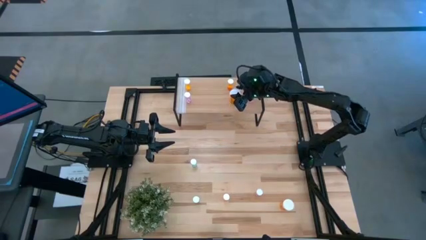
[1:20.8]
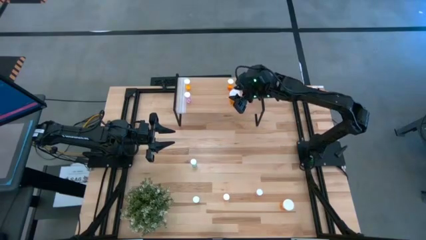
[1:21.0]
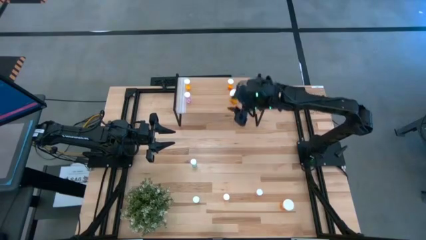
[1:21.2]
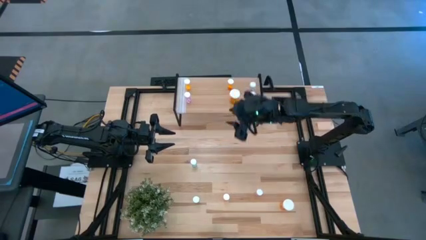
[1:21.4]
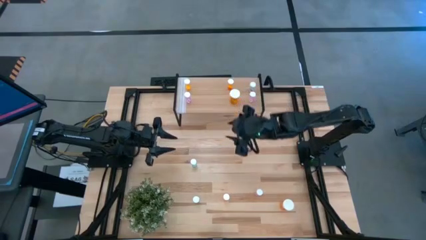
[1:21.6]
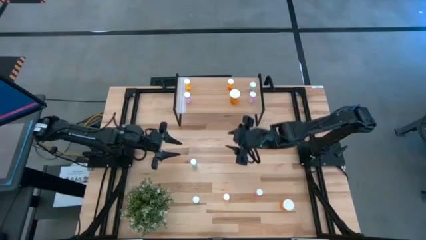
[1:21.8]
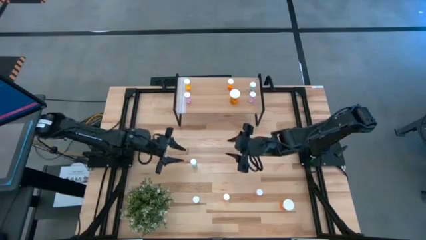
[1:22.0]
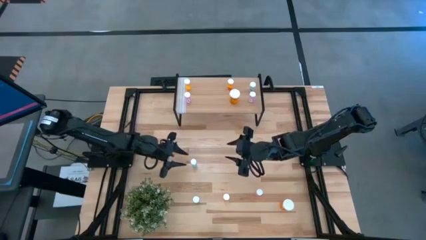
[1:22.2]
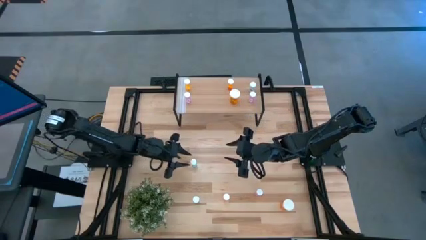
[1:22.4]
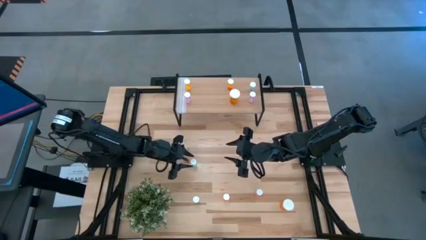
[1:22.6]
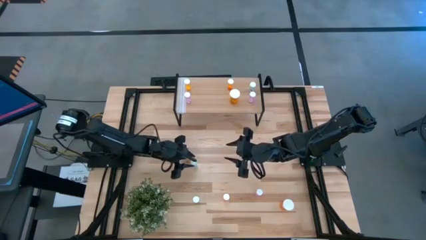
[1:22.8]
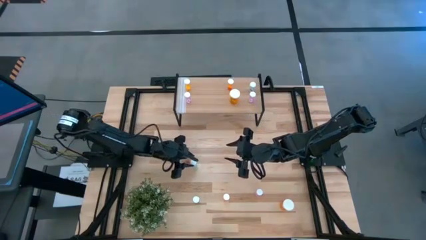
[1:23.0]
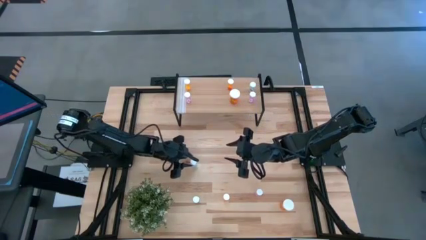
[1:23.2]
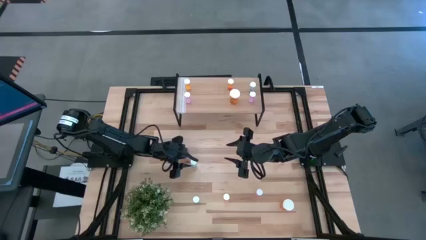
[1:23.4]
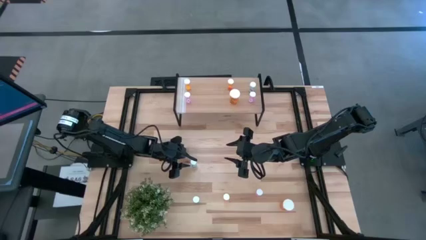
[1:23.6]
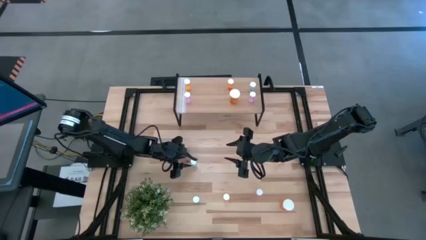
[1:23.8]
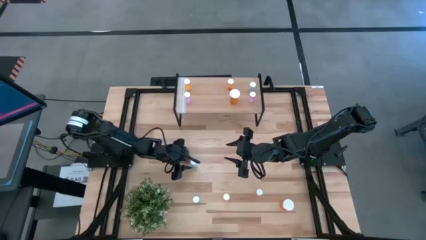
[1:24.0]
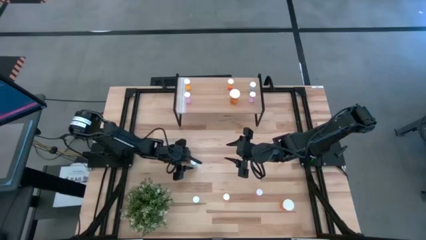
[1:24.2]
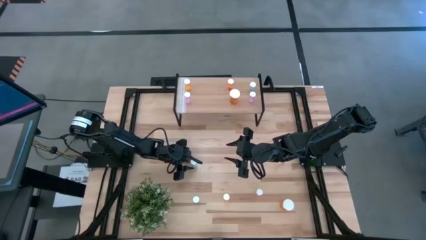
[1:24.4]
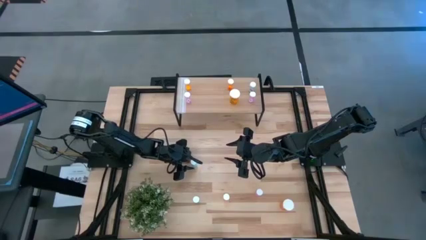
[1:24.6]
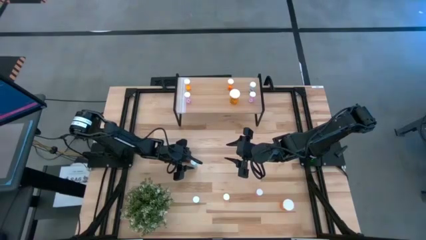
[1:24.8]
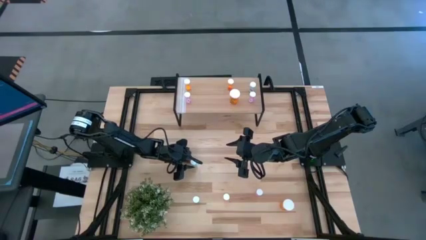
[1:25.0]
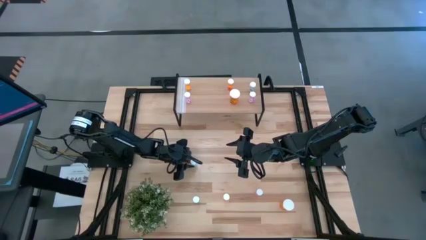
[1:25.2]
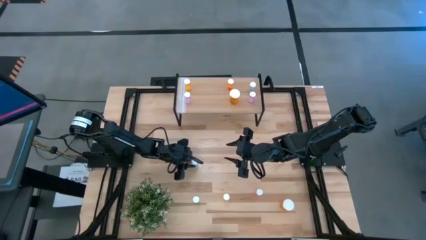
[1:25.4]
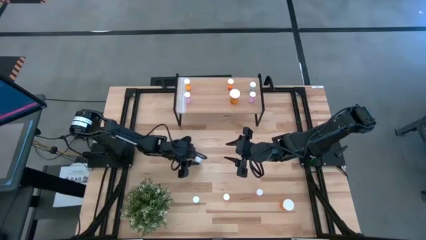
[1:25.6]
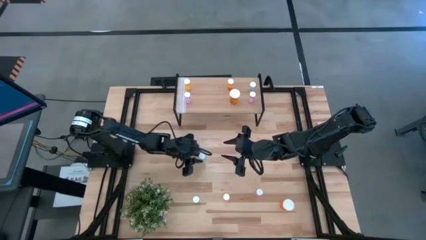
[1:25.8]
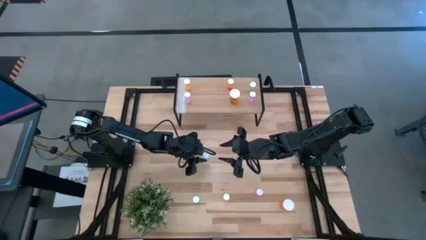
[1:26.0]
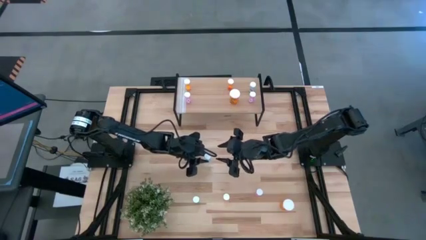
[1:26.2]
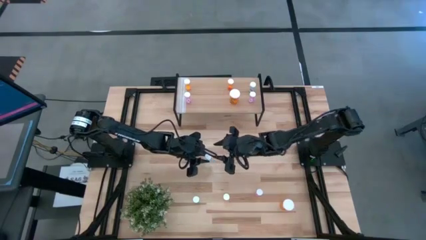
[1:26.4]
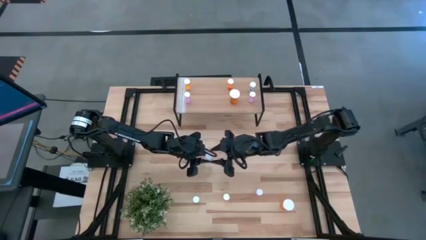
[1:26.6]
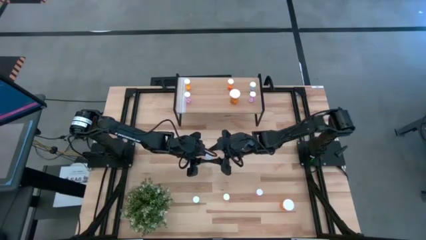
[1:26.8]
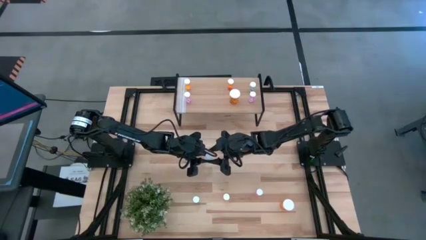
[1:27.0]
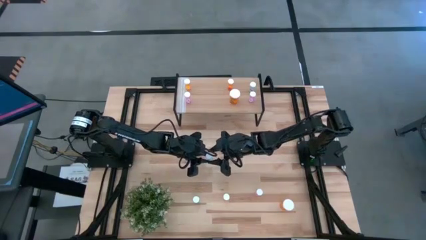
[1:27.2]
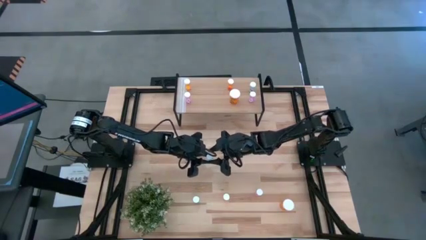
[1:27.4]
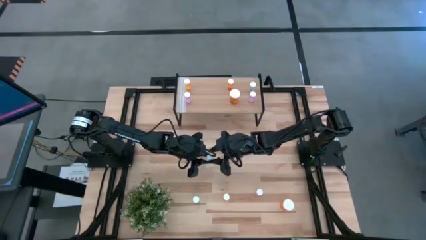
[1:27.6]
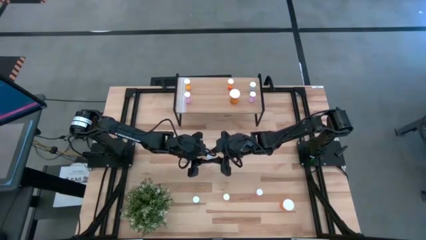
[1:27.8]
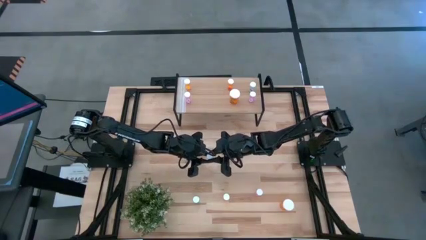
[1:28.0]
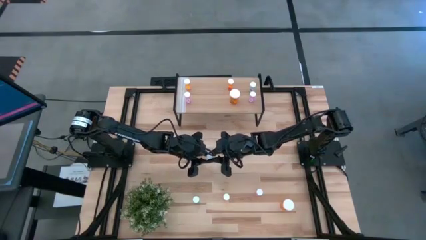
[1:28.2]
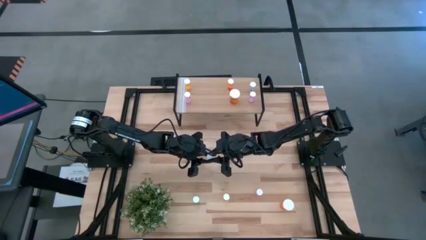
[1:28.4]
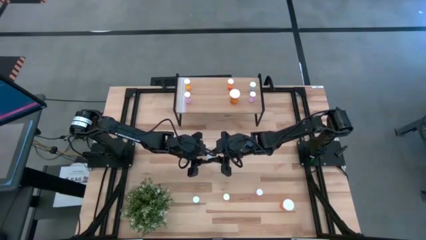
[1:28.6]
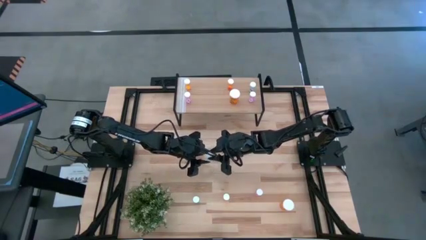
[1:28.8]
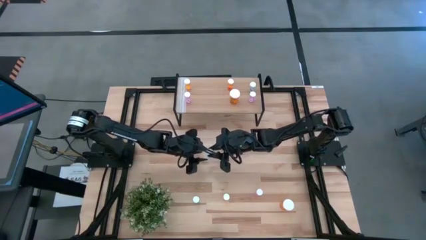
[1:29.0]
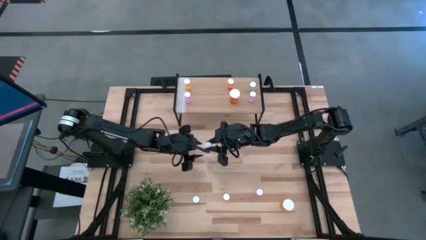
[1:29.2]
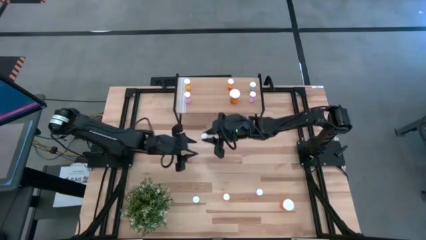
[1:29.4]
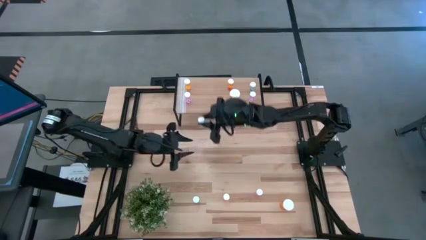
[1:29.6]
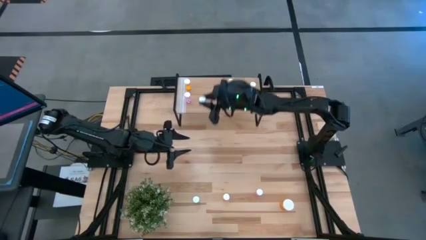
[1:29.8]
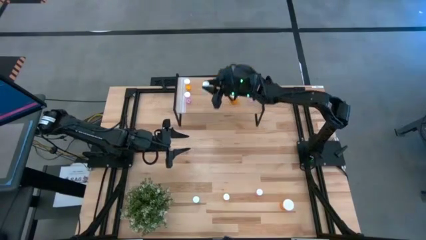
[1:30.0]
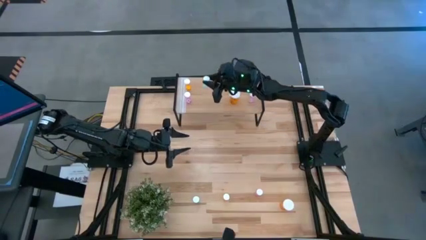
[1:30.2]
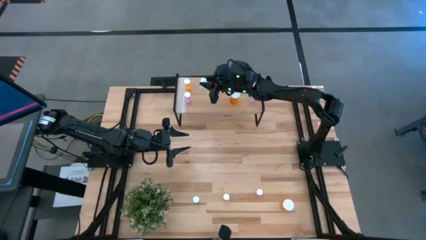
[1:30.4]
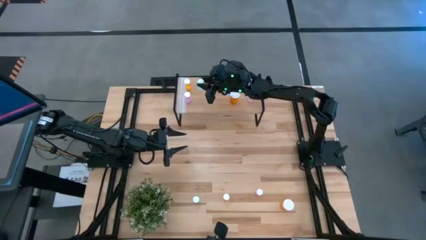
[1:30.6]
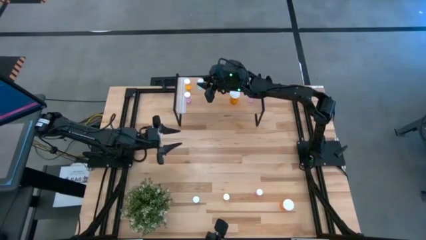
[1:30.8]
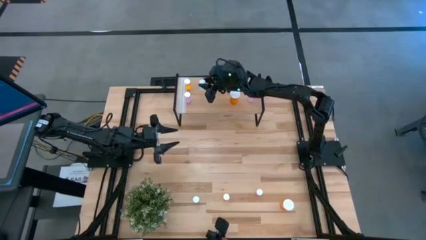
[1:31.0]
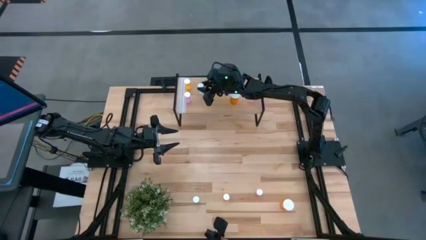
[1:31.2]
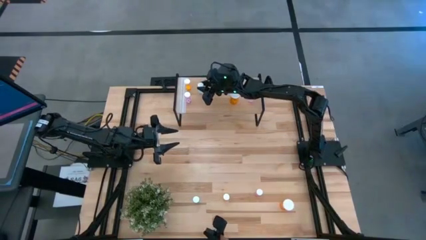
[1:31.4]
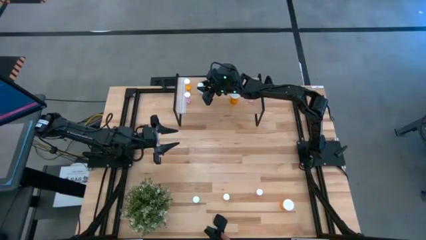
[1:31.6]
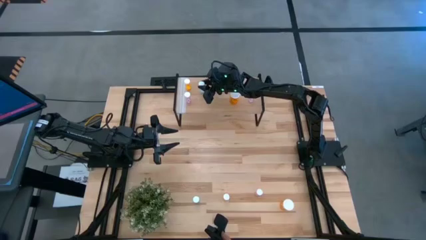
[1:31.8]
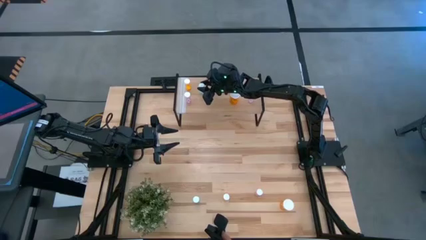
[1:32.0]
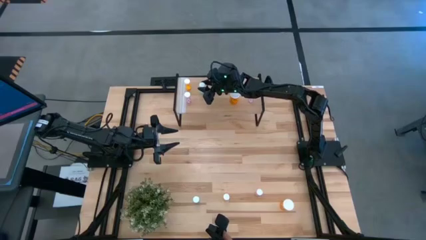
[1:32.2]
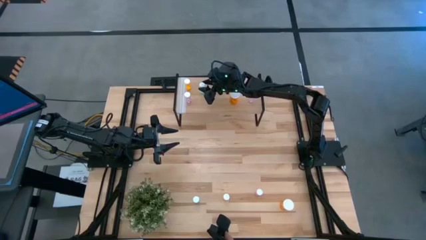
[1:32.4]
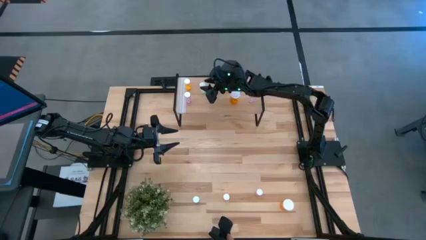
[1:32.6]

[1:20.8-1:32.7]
Task: Pick and place medicine bottles onto shelf by color
Put the blue pill bottle on the shelf
